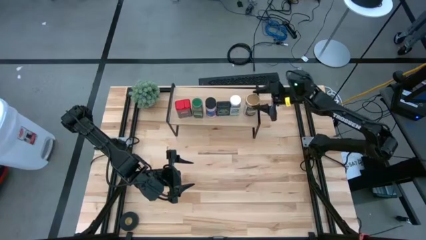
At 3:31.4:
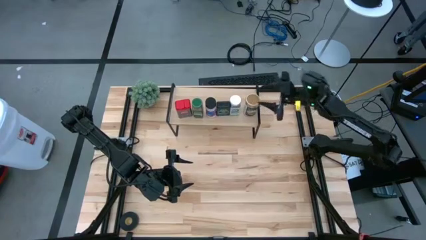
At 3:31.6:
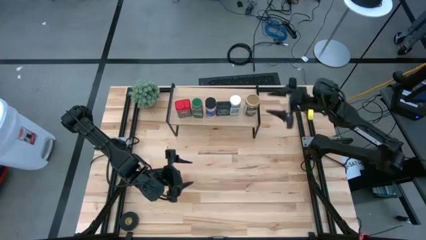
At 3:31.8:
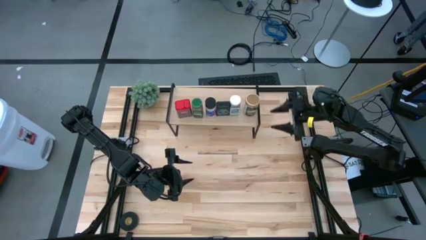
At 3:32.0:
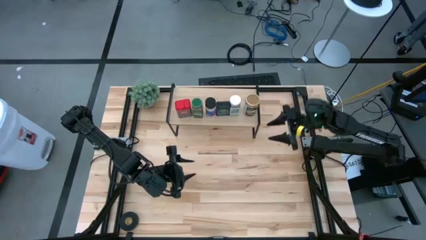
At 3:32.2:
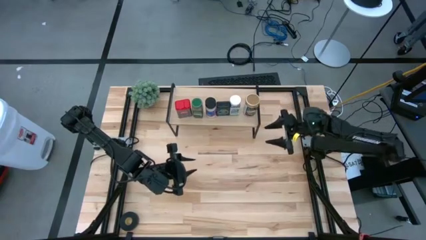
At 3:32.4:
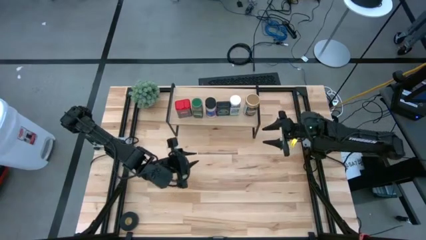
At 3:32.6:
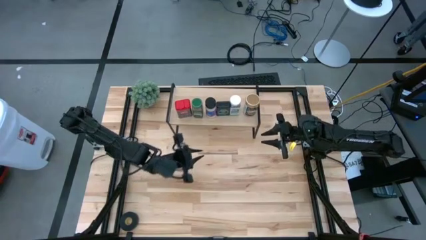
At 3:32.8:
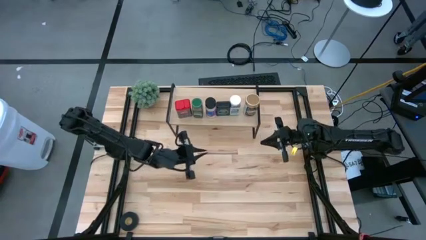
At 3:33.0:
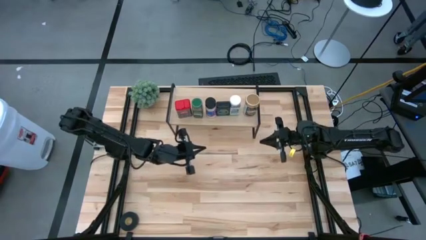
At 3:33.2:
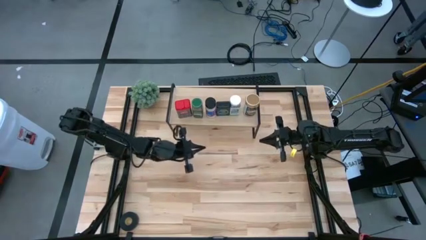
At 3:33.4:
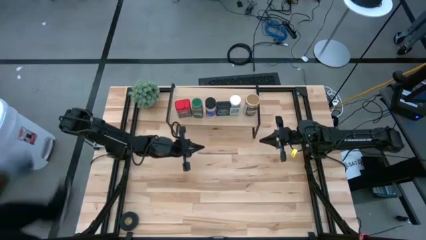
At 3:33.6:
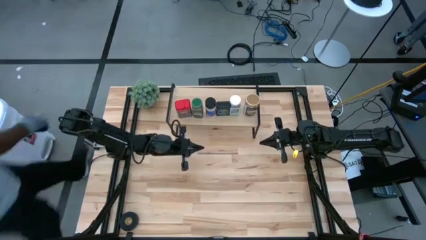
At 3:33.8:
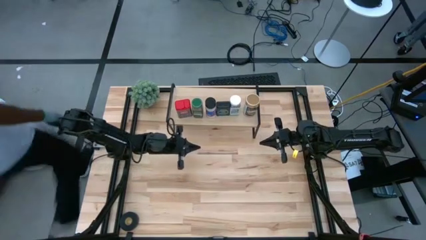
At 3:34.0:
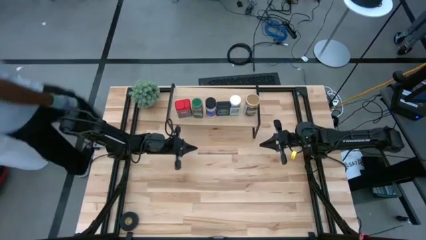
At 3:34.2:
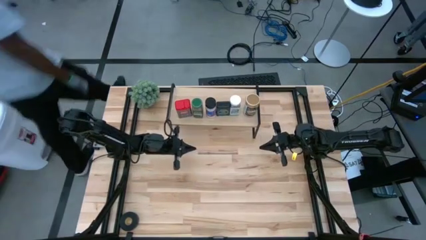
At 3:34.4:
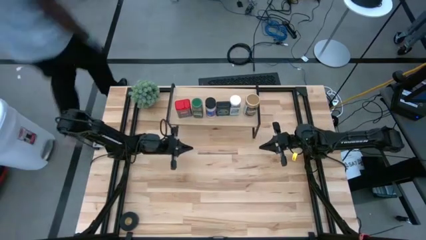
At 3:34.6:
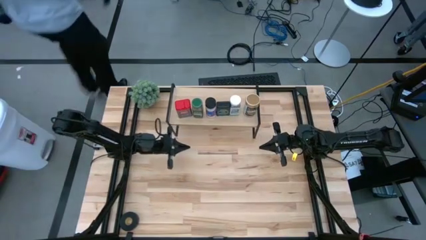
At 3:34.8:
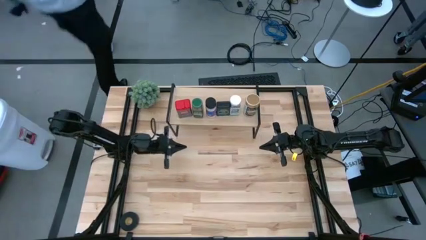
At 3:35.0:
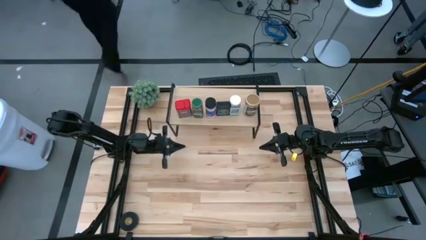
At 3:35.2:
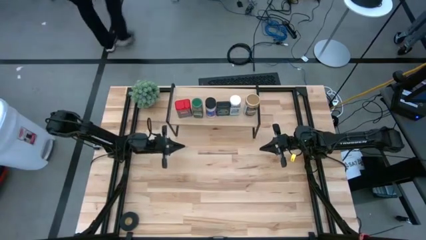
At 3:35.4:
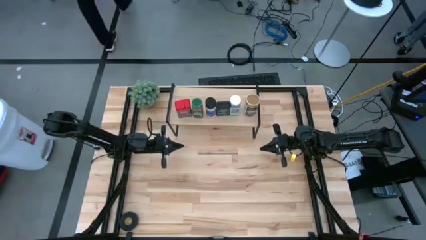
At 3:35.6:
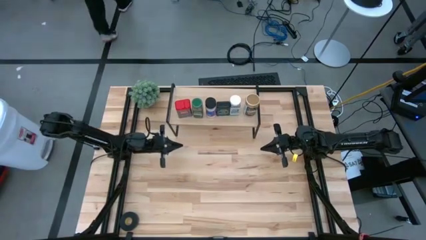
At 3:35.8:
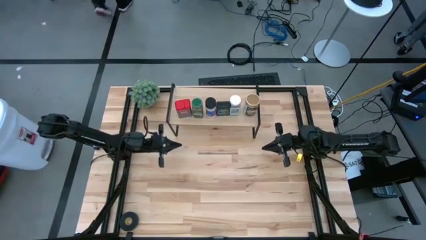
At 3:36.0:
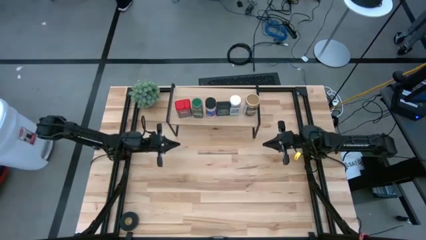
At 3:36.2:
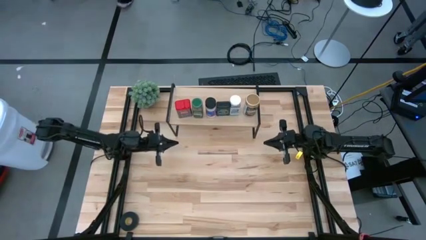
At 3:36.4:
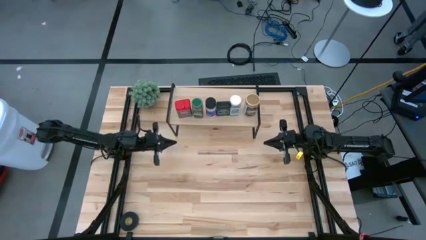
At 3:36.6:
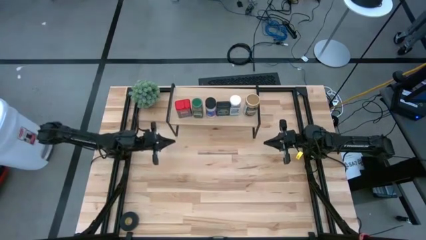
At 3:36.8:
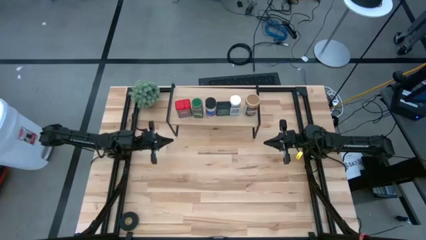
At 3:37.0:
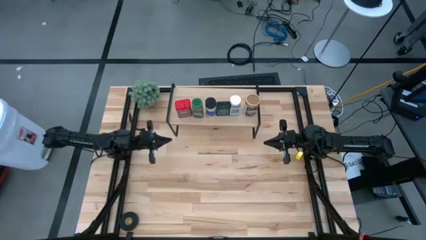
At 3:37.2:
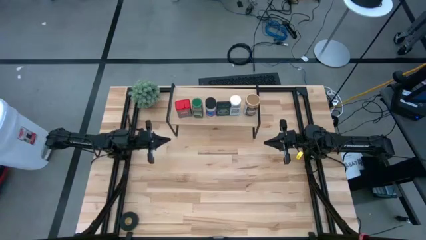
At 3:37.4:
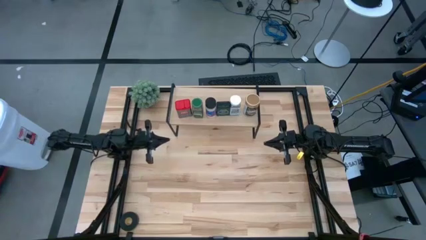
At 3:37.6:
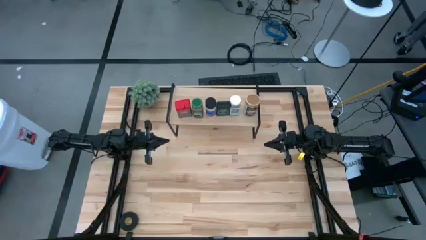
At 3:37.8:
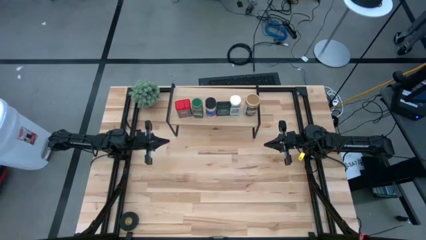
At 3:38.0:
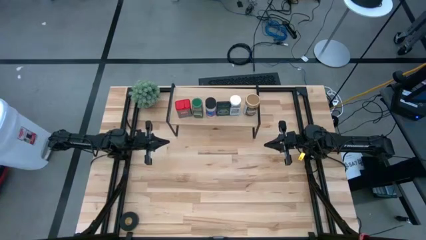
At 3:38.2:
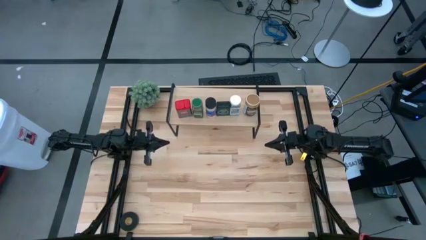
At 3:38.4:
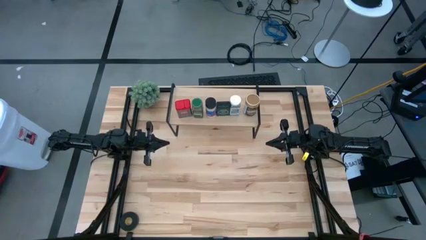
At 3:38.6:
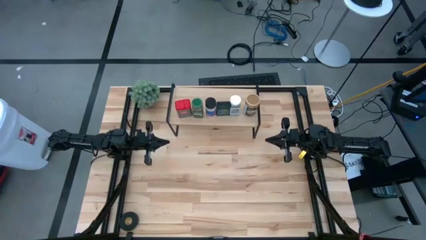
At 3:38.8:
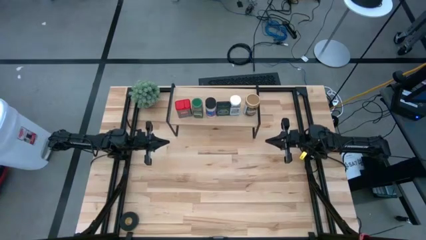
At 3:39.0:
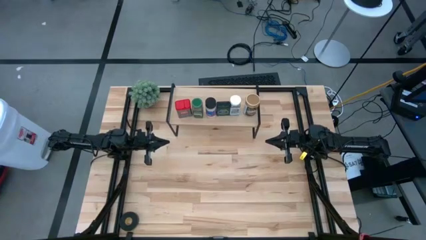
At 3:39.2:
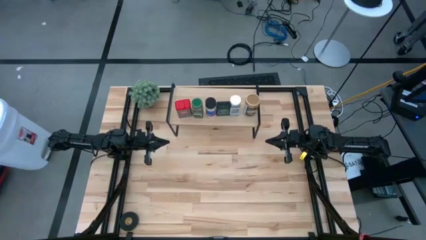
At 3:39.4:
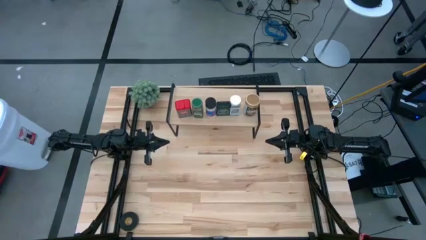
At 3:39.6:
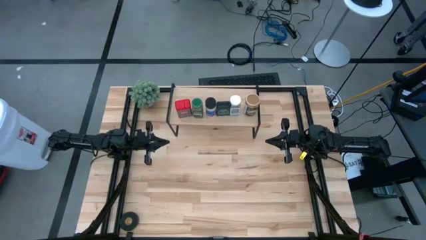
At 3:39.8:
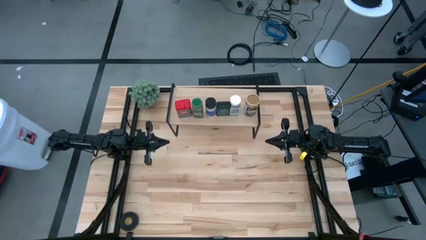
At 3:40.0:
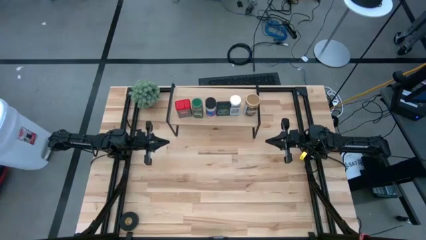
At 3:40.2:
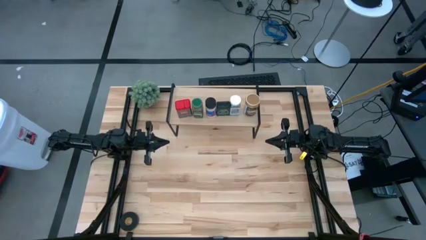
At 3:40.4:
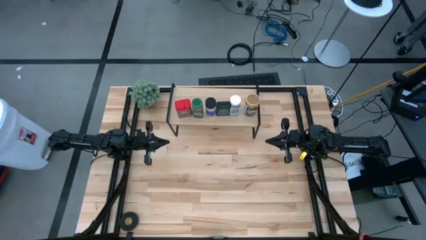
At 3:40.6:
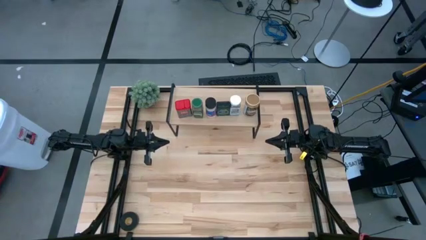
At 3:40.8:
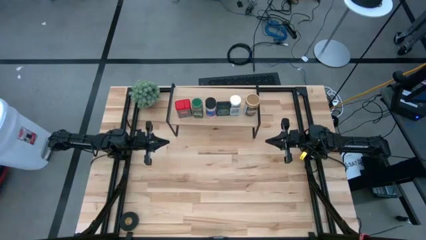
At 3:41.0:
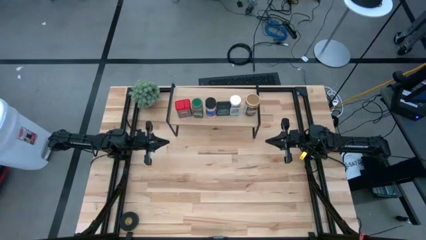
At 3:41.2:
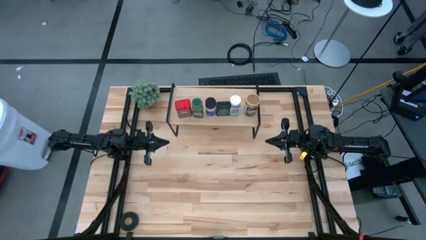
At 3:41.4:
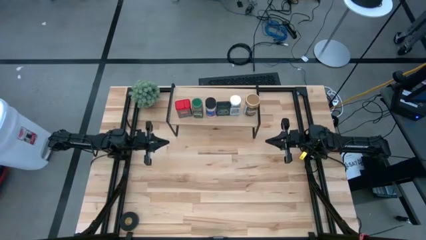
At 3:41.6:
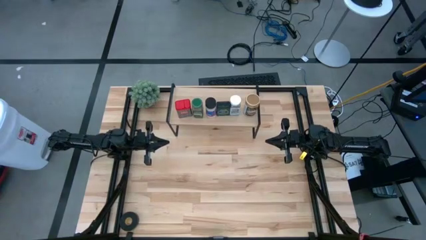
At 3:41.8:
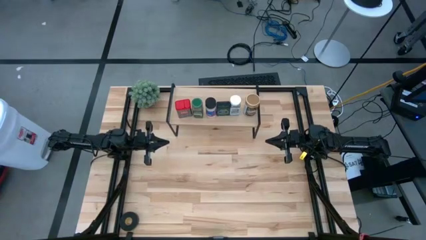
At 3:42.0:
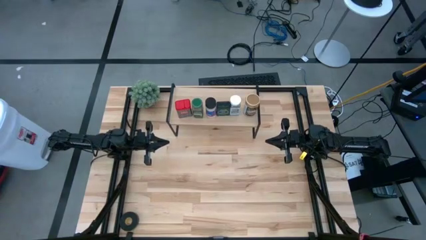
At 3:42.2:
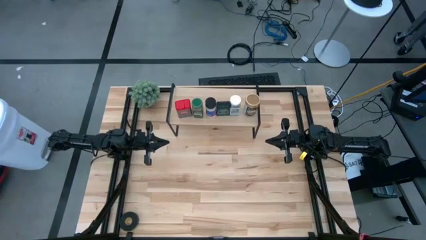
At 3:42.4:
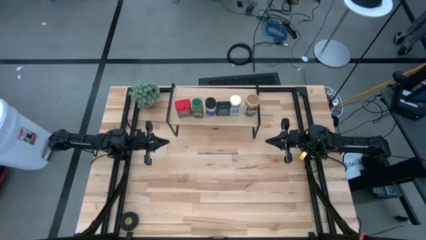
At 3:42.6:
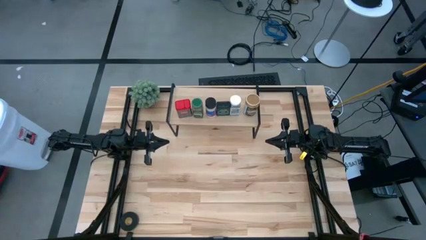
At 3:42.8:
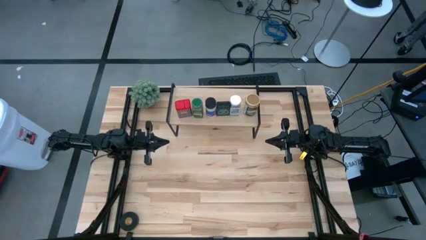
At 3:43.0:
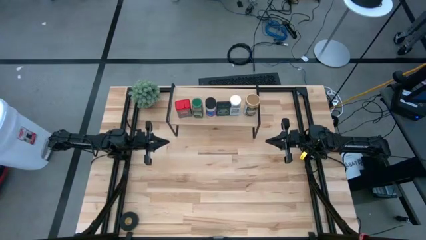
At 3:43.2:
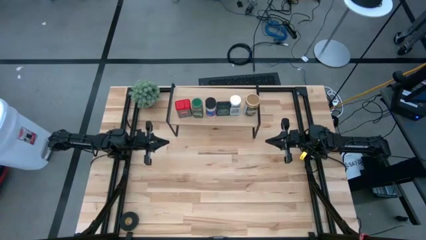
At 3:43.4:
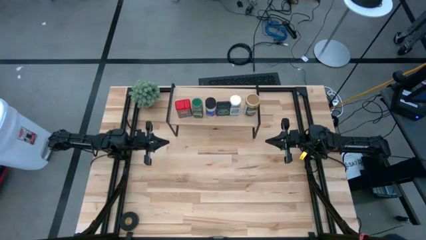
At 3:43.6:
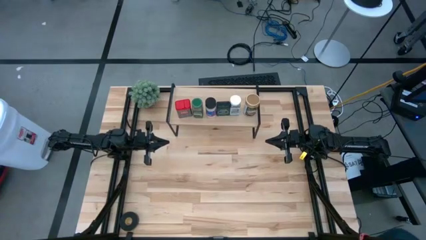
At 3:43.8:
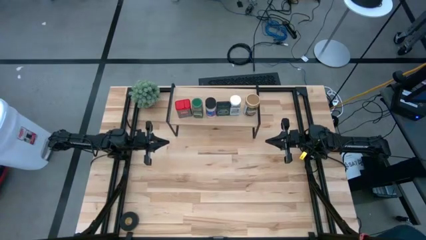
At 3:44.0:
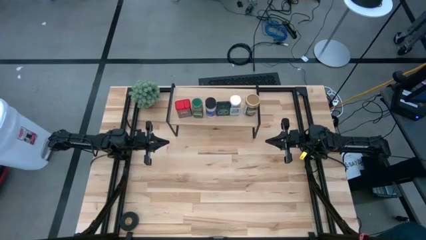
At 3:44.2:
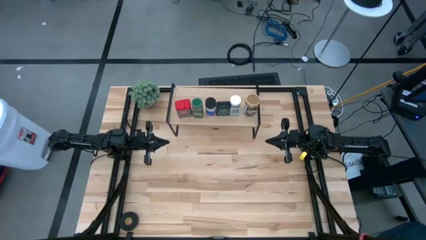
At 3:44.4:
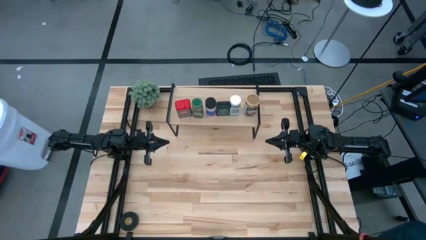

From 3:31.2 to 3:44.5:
Task: Shelf spices
Return to Home Position

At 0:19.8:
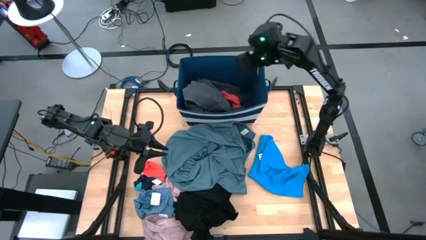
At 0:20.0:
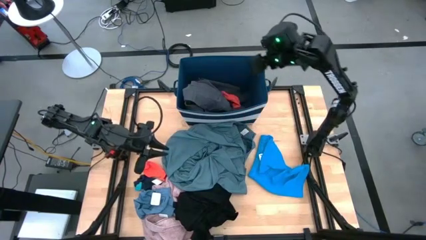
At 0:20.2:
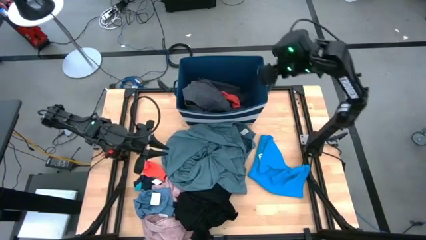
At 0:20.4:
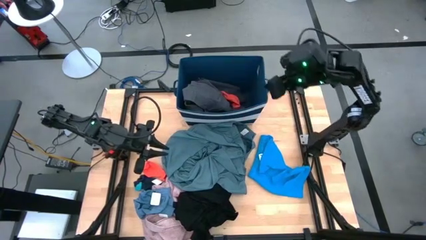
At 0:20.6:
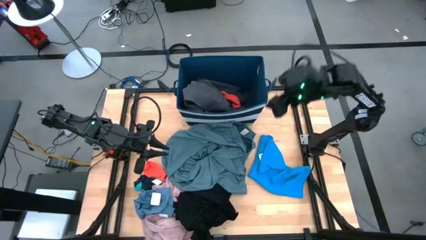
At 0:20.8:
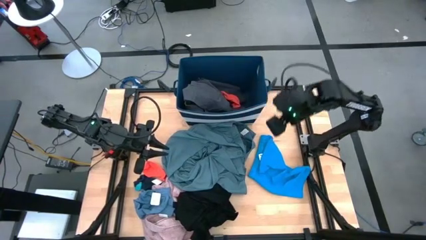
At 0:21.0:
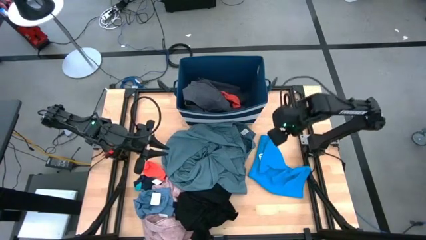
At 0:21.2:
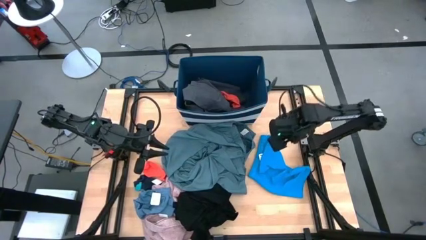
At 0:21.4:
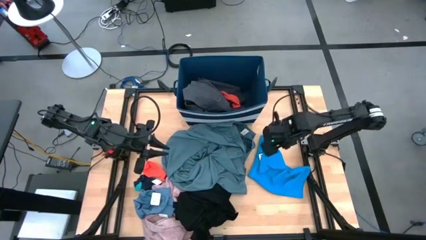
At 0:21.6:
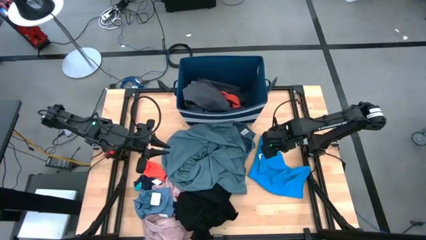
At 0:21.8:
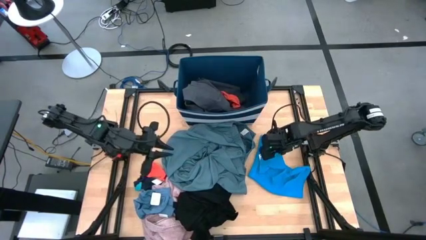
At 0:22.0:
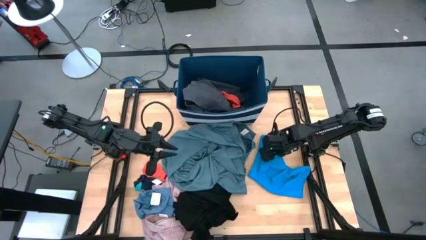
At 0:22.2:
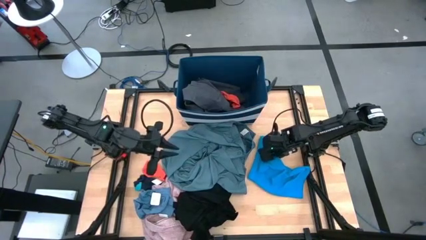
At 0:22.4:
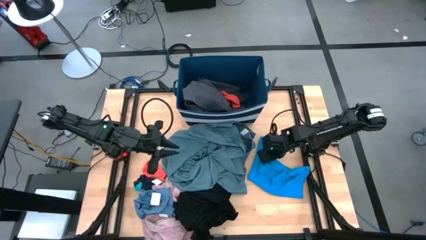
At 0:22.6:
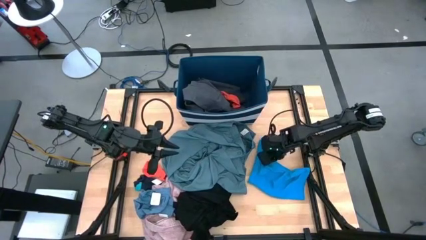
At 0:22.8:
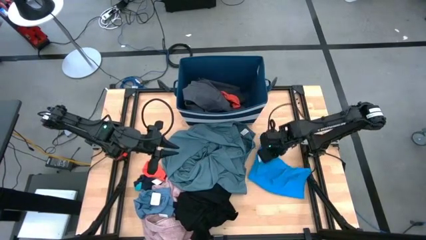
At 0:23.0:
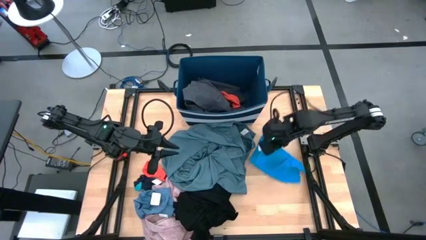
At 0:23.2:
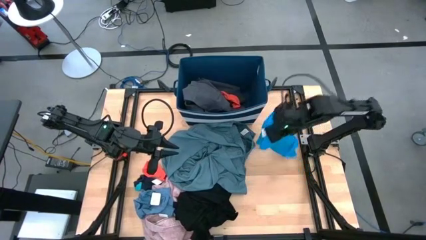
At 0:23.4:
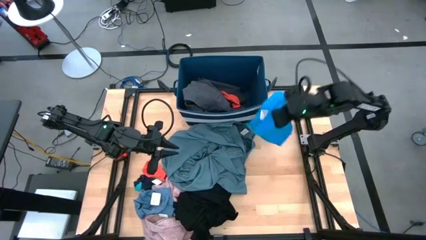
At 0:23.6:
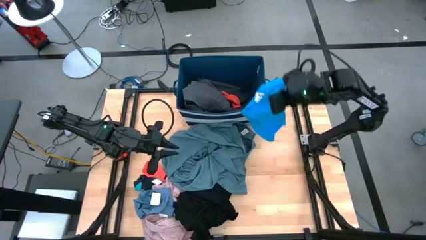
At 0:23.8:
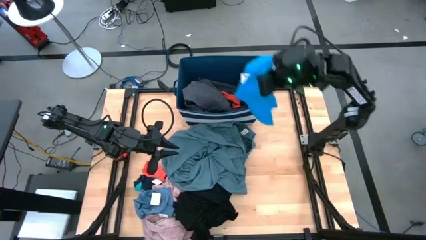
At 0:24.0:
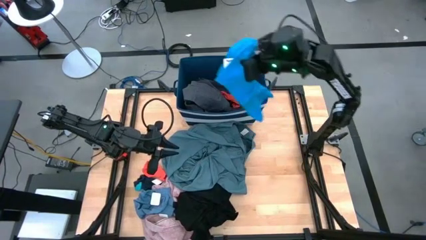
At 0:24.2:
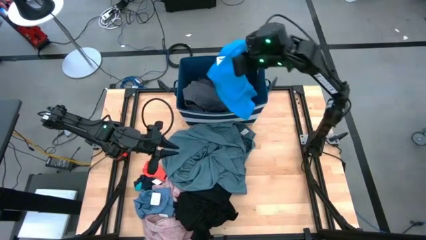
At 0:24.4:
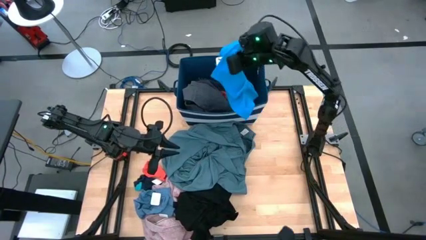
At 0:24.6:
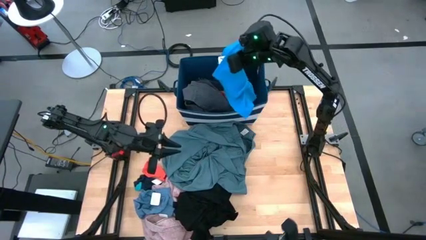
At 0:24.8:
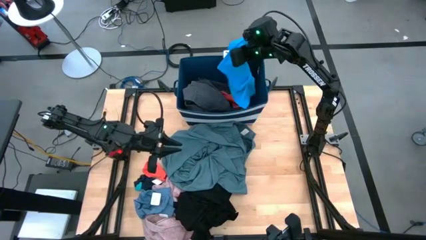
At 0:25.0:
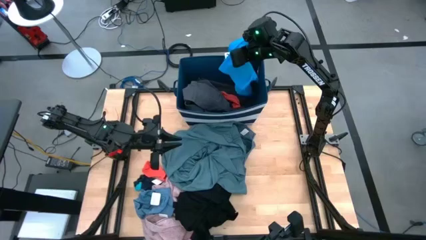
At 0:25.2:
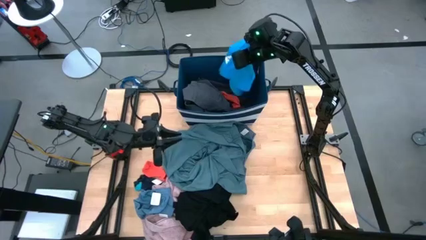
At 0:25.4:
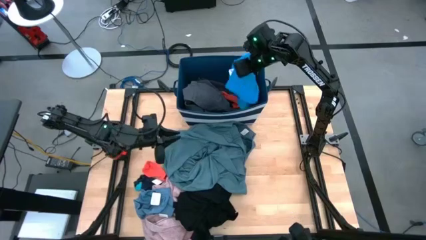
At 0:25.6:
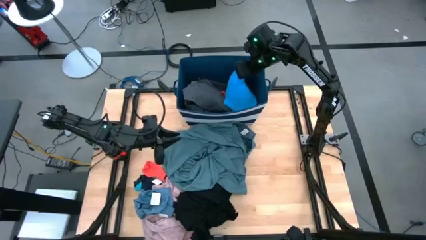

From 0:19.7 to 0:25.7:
Task: Sort clothes
Put the blue shorts into the blue bin
